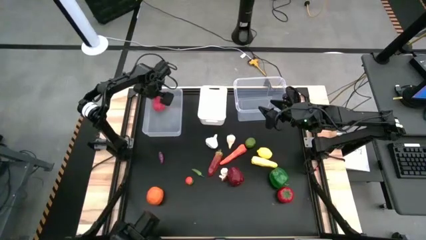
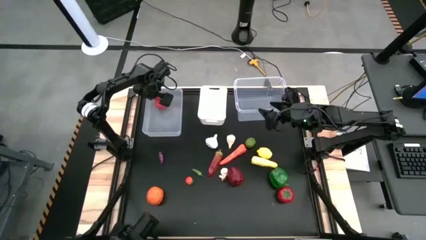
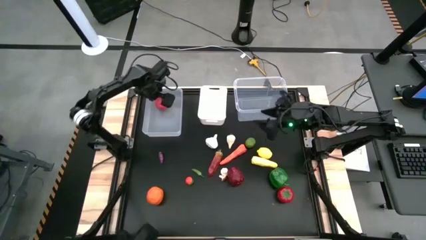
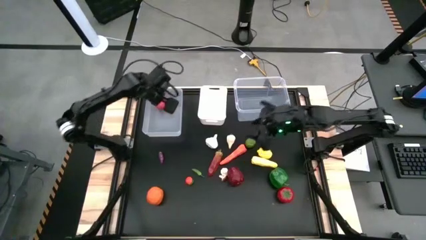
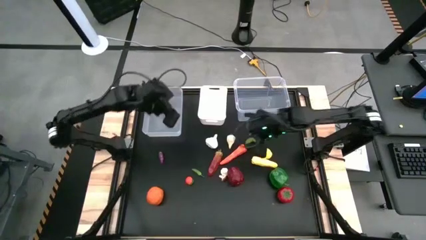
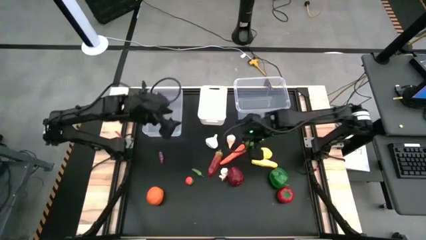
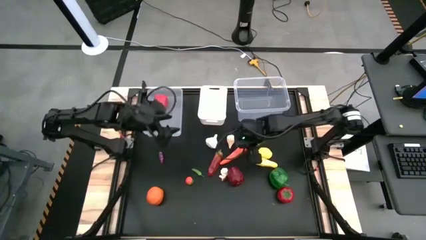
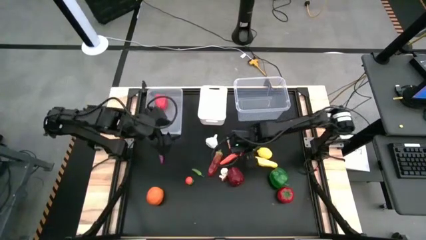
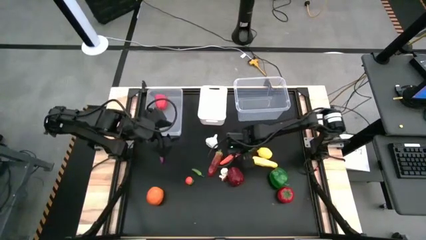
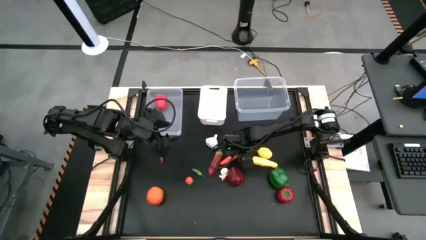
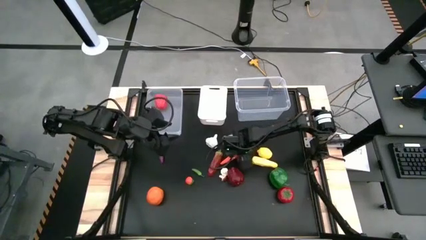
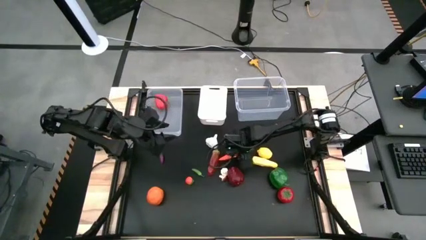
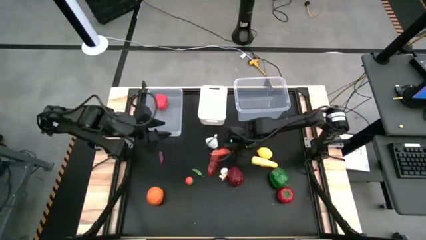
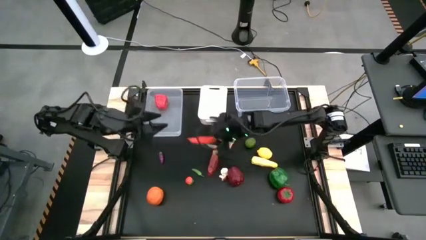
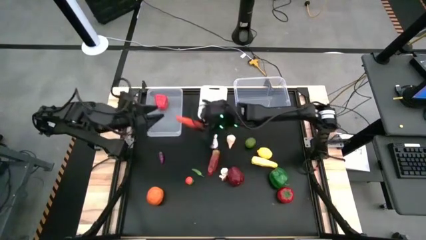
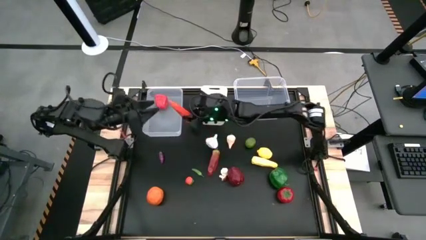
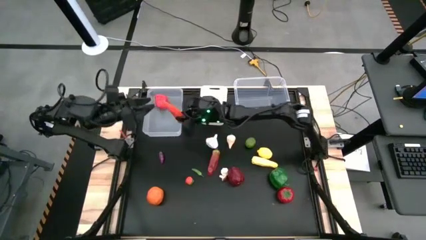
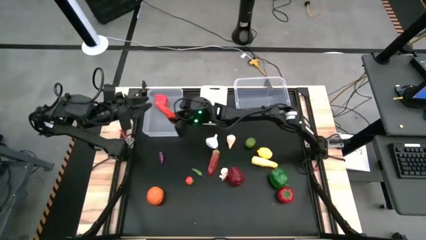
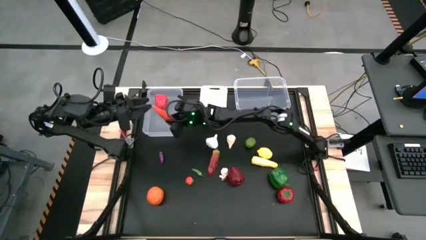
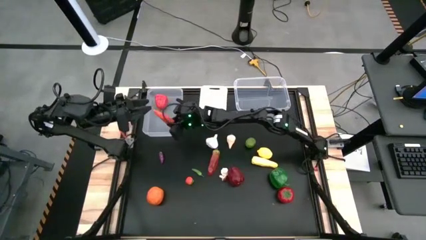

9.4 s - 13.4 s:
Task: Sort produce into baskets
Put the carrot into the left transparent bin

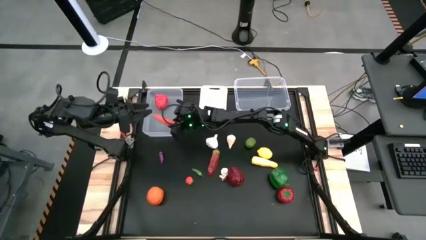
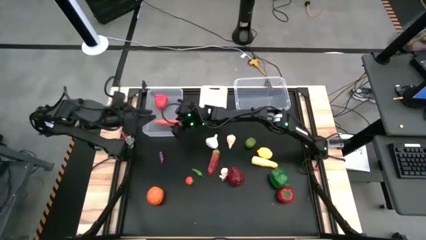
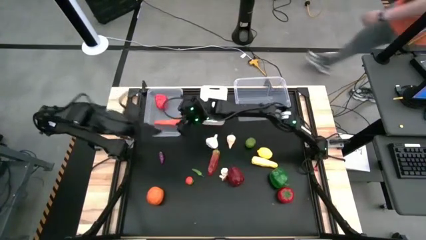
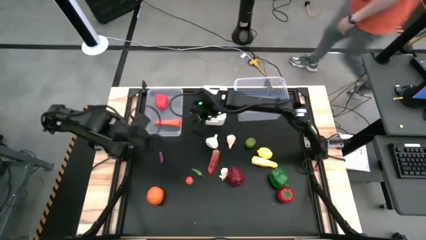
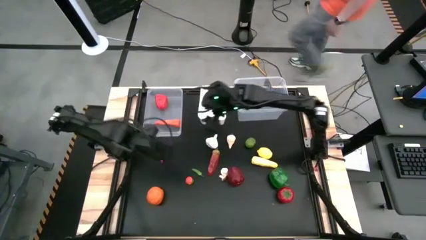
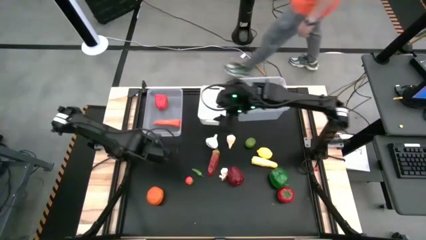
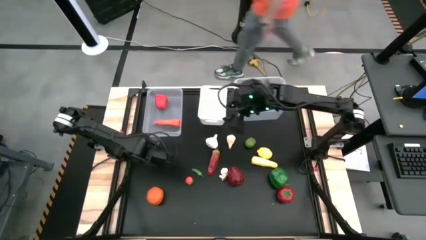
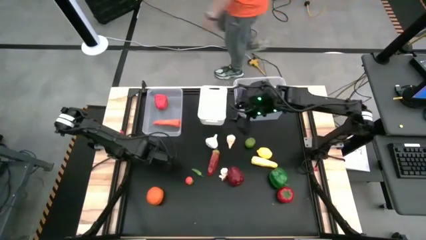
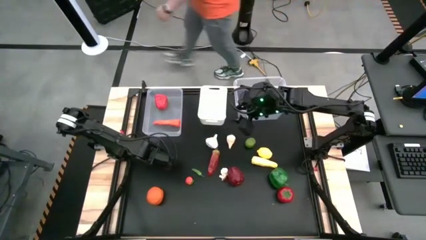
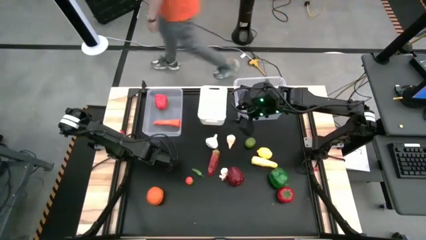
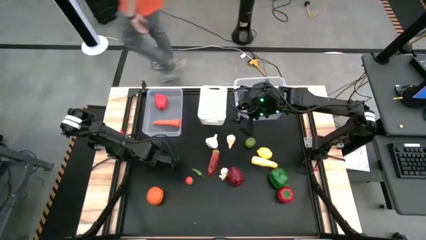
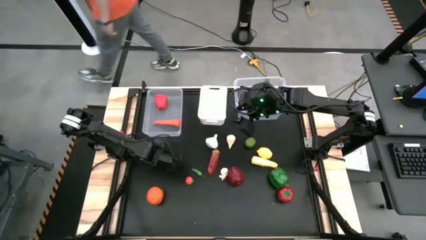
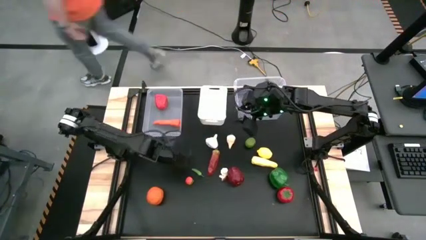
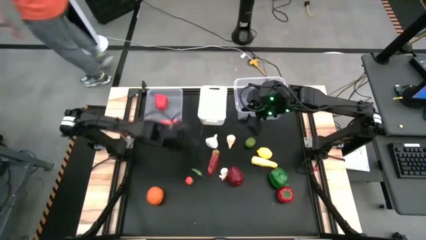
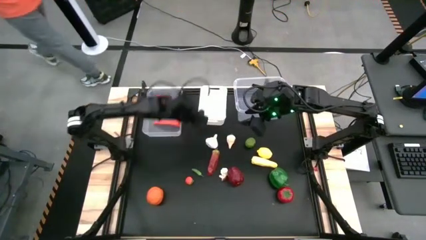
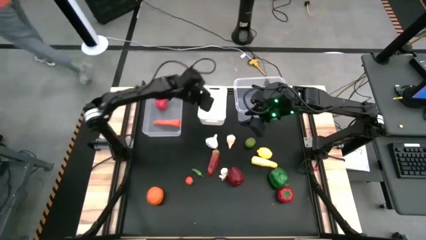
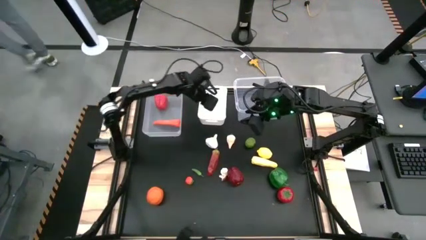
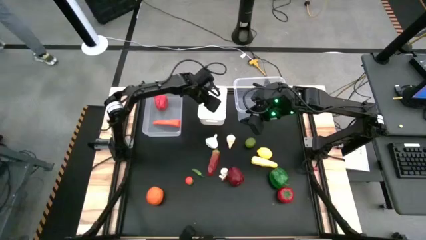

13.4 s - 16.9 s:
Put the eggplant into the white bin

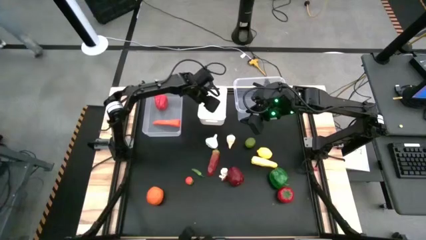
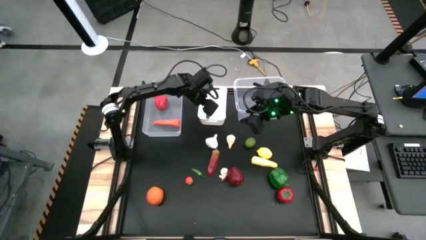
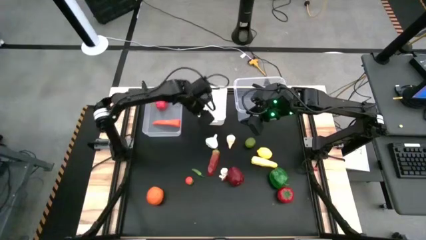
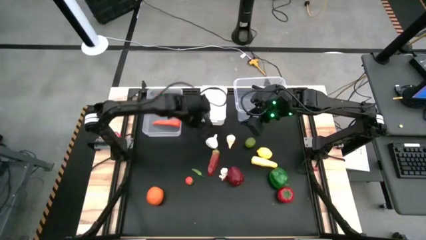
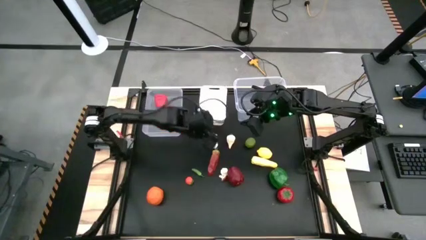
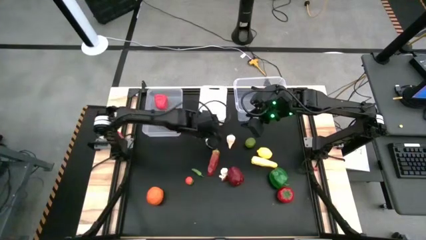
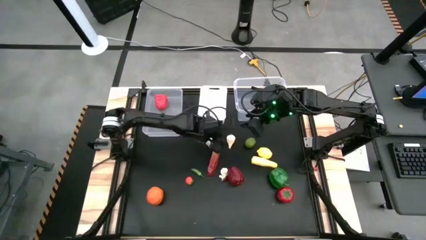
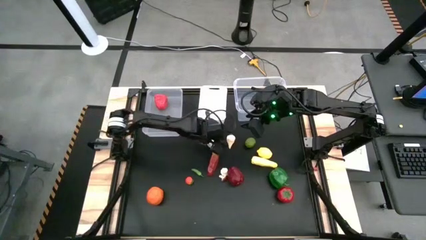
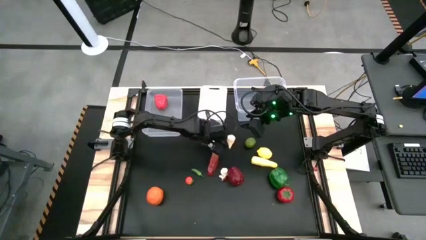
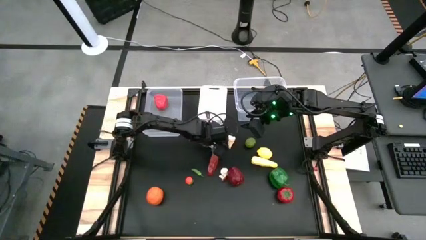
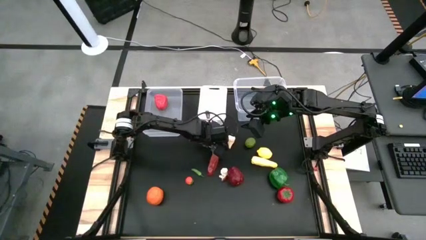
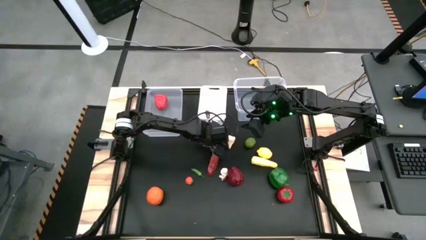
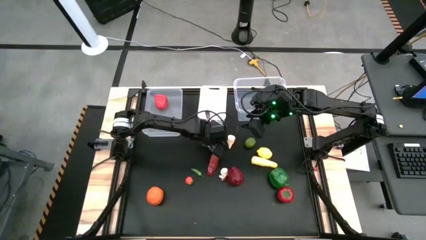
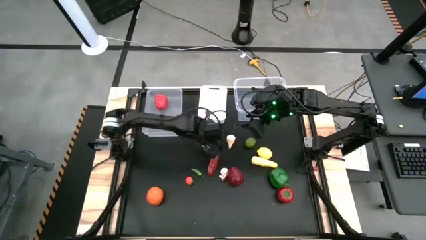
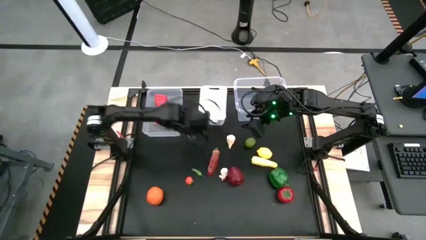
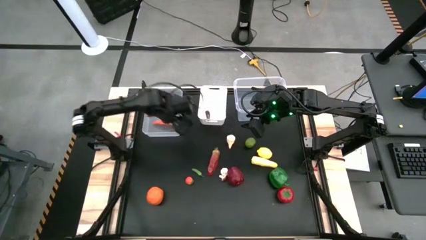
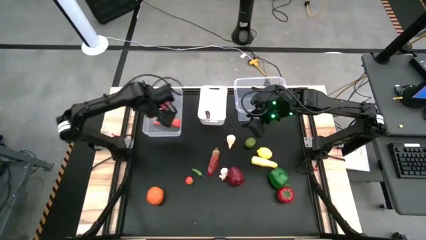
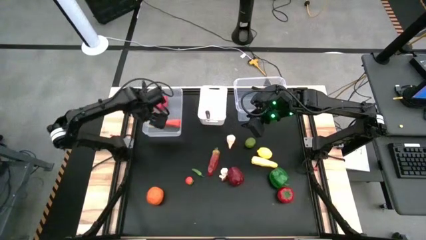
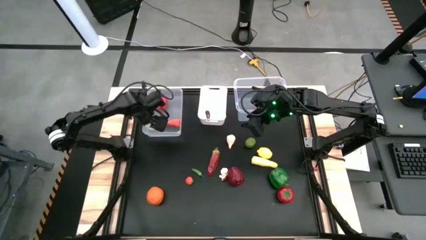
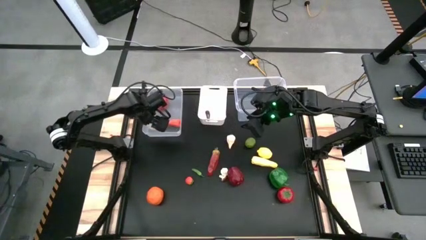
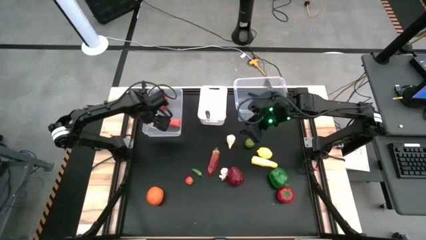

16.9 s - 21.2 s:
Put the top left white garlic into the left transparent bin

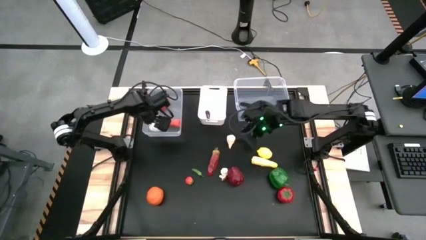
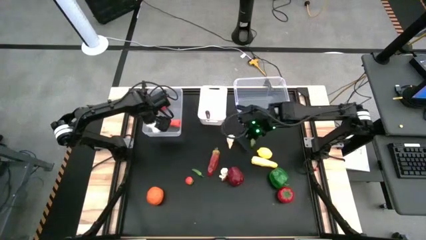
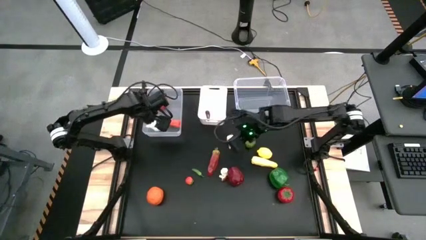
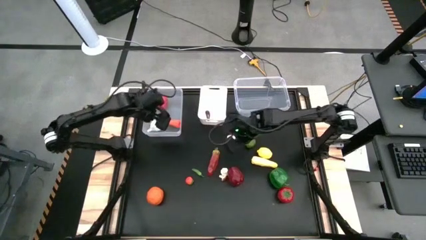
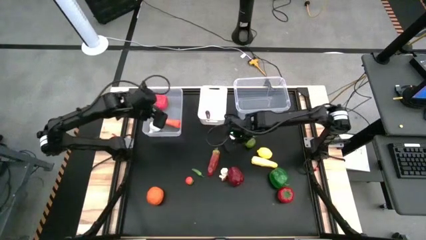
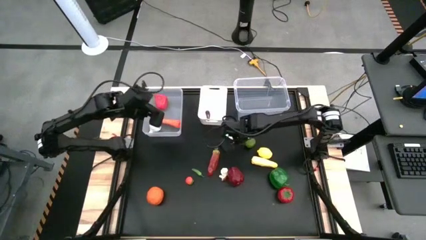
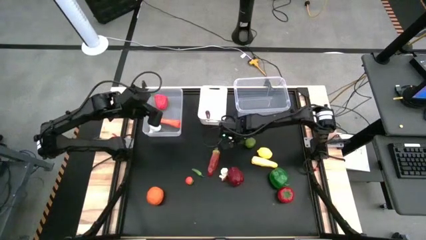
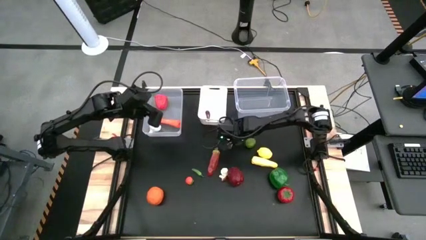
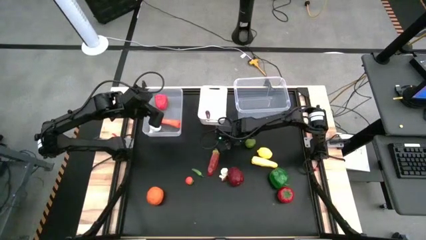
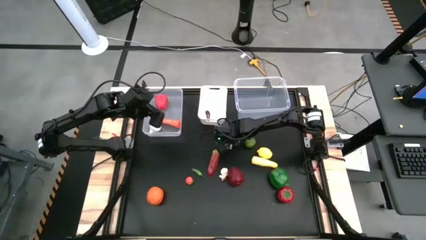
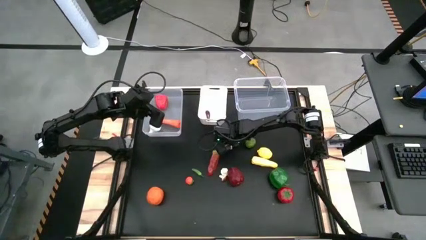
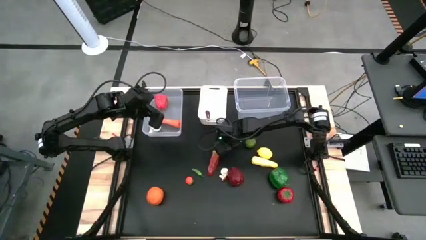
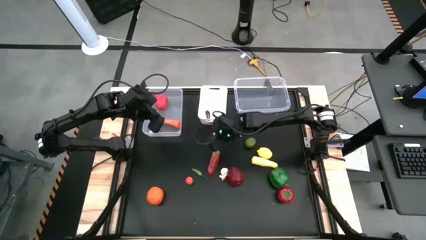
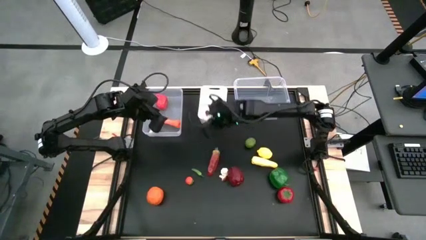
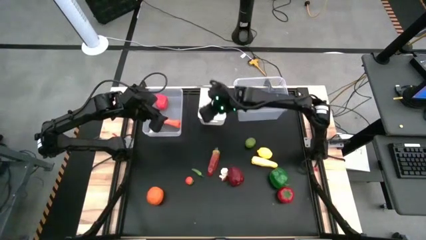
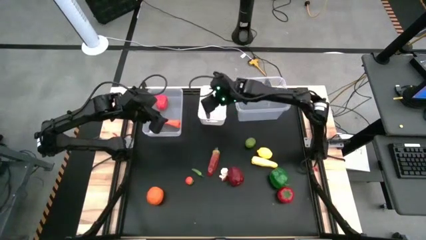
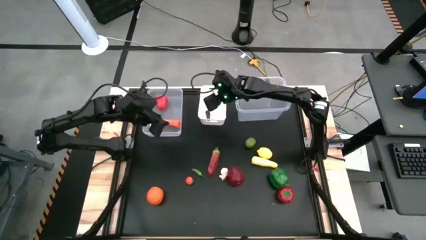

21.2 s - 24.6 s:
Put the top white garlic into the white bin

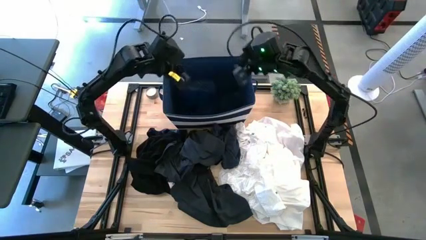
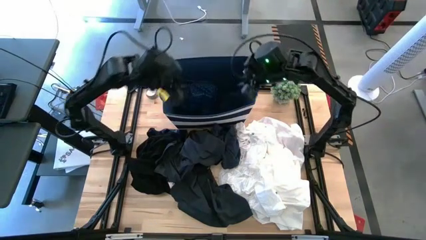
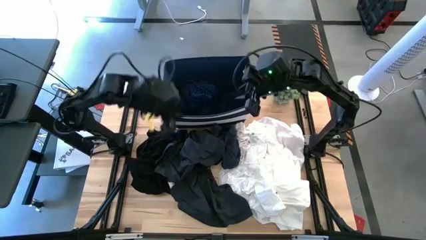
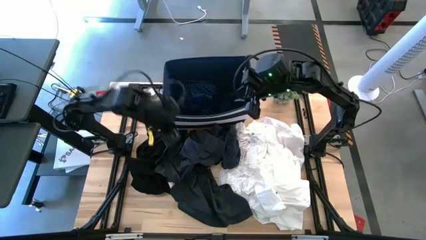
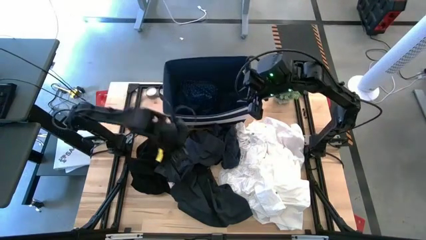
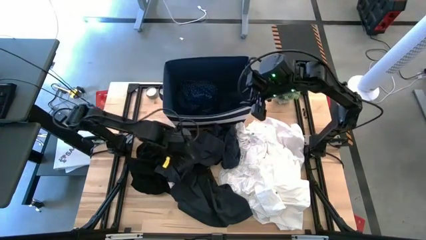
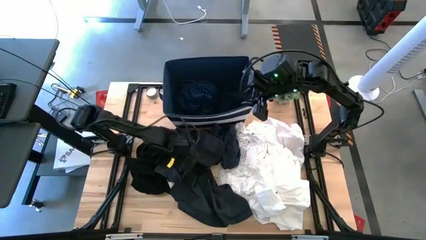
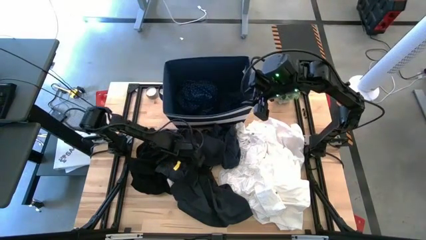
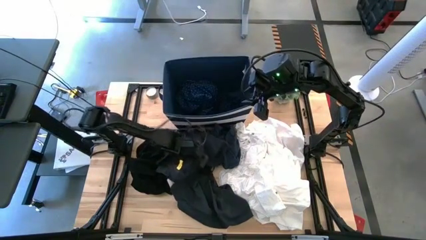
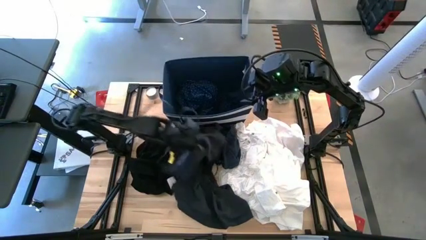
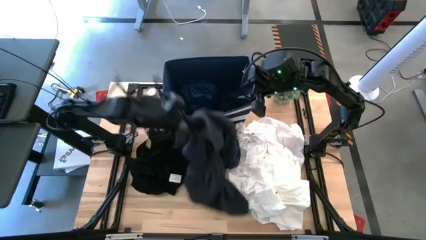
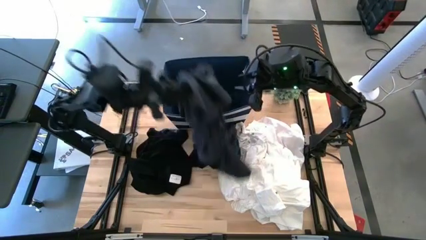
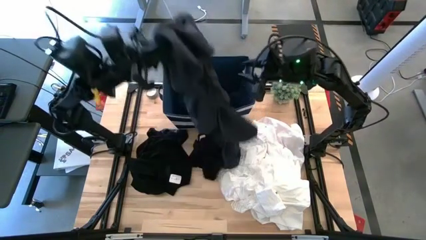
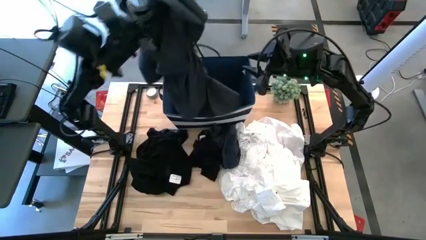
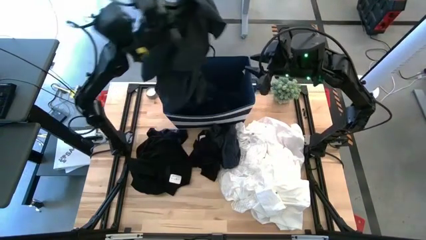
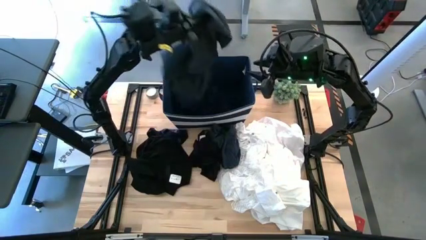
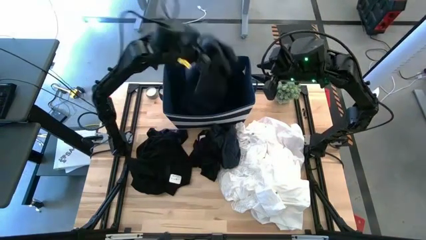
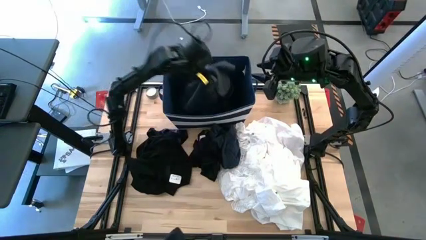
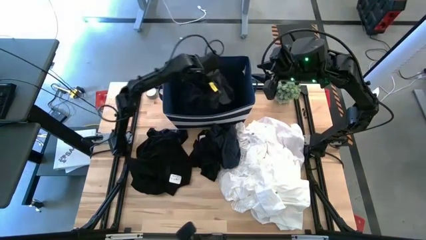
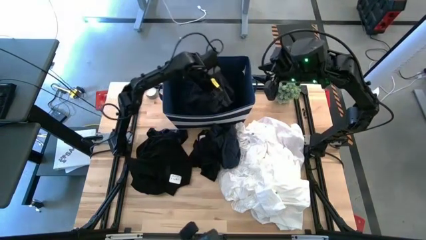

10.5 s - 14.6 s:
Task: Sort clothes
Put the grey shorts into the blue bin
